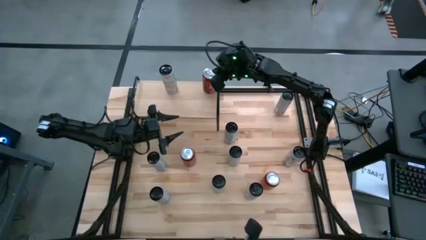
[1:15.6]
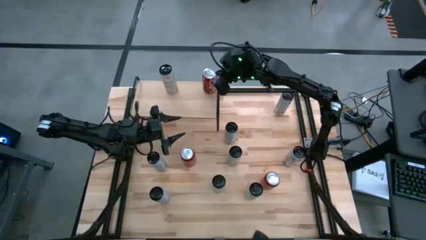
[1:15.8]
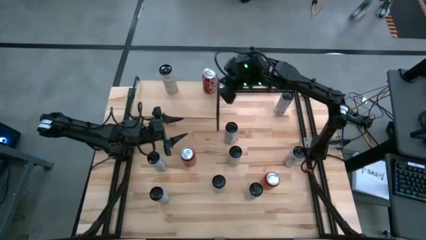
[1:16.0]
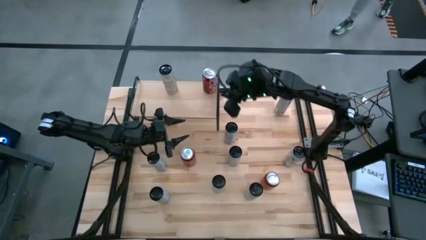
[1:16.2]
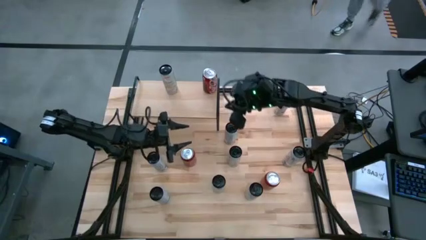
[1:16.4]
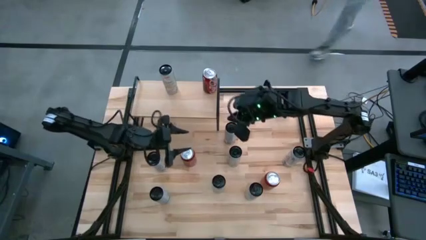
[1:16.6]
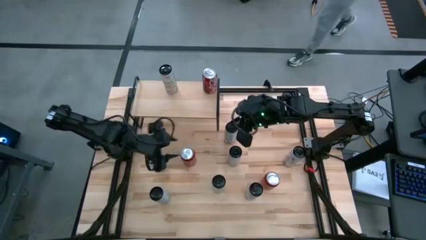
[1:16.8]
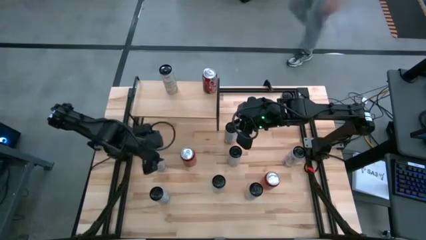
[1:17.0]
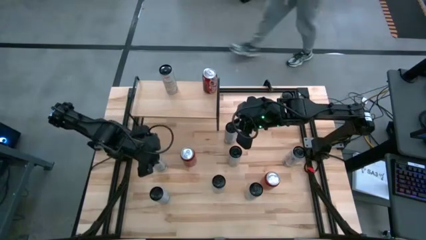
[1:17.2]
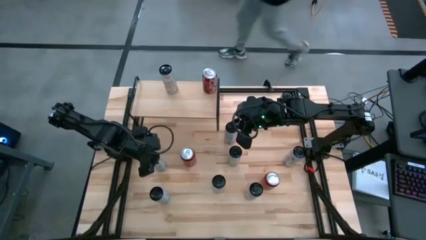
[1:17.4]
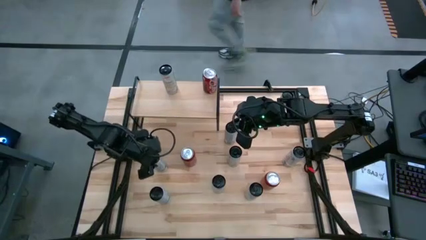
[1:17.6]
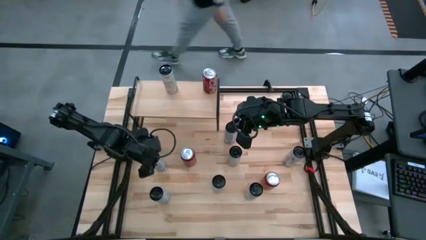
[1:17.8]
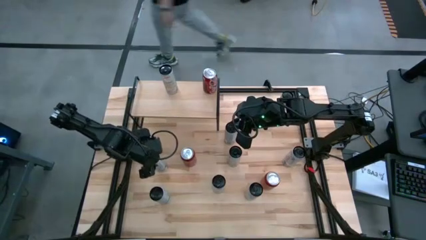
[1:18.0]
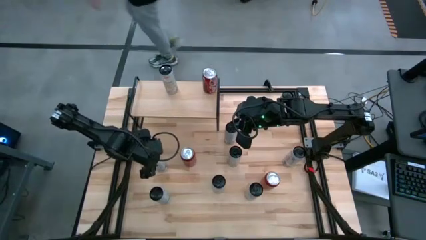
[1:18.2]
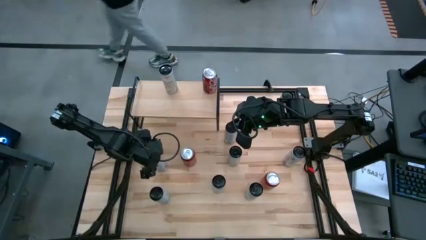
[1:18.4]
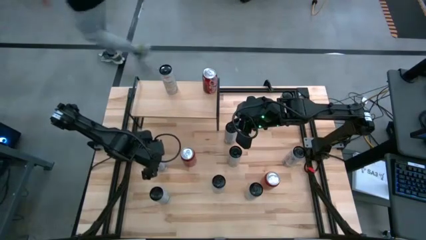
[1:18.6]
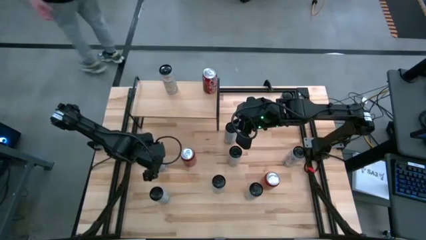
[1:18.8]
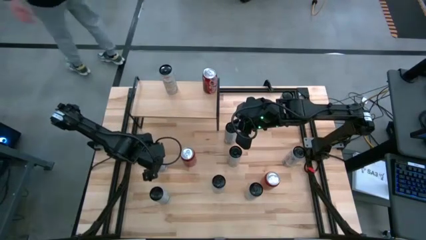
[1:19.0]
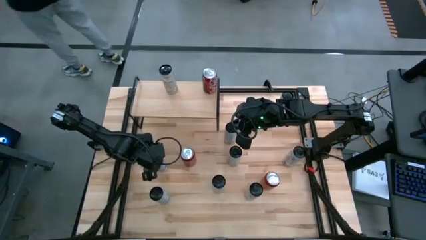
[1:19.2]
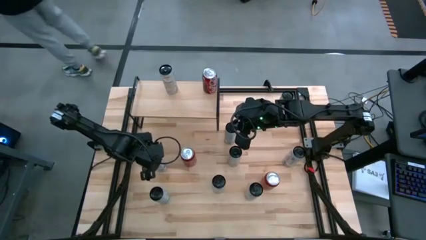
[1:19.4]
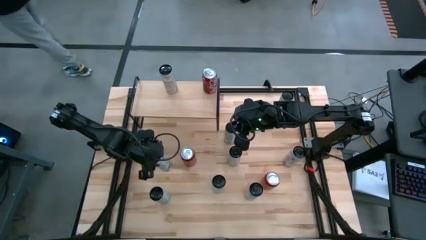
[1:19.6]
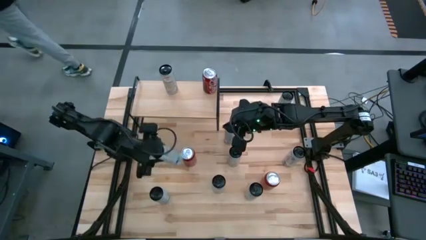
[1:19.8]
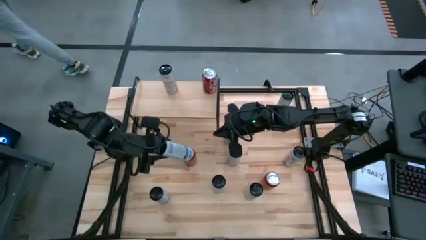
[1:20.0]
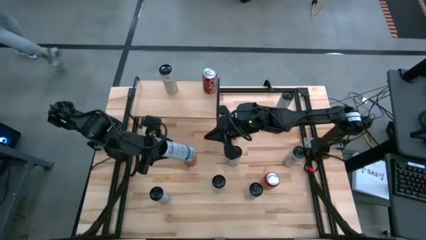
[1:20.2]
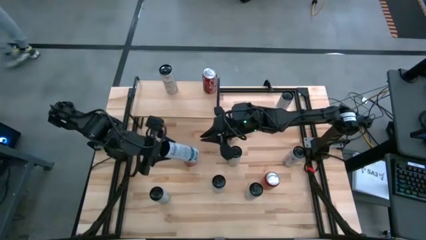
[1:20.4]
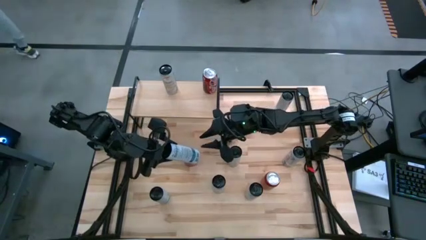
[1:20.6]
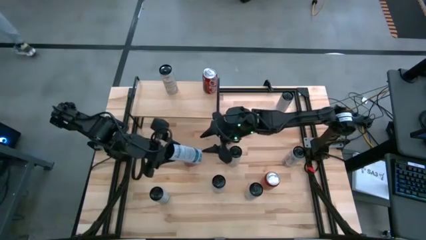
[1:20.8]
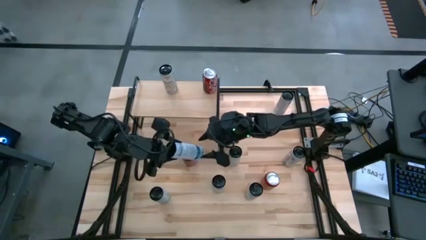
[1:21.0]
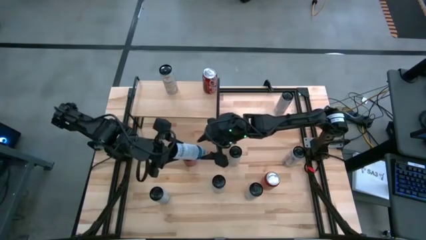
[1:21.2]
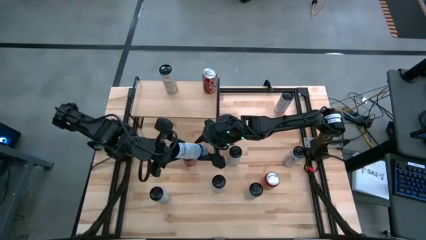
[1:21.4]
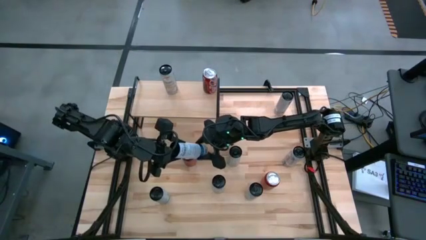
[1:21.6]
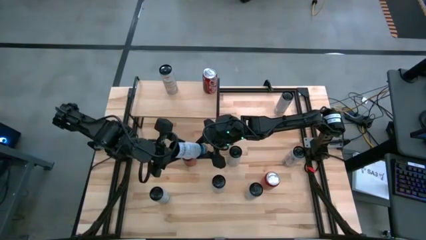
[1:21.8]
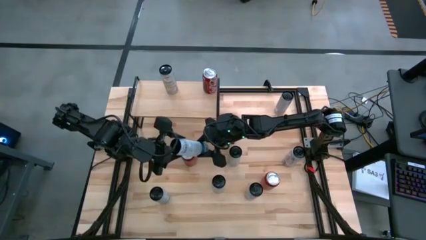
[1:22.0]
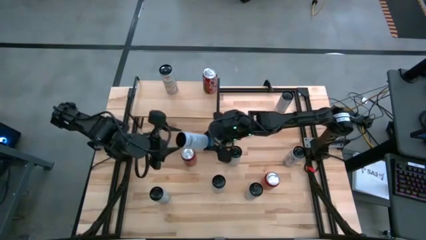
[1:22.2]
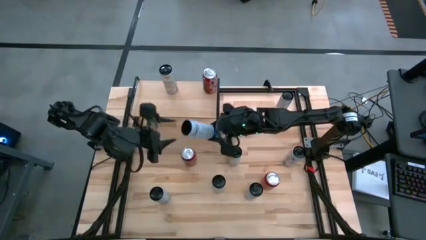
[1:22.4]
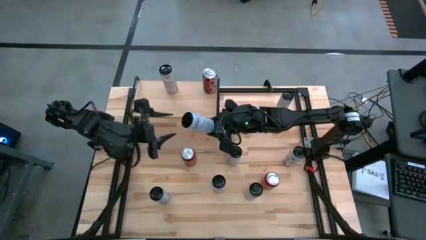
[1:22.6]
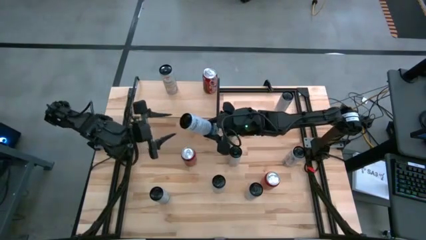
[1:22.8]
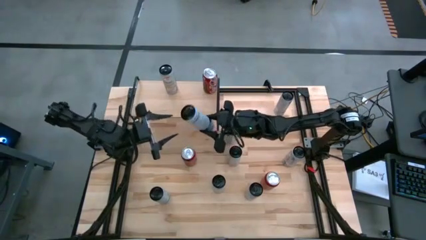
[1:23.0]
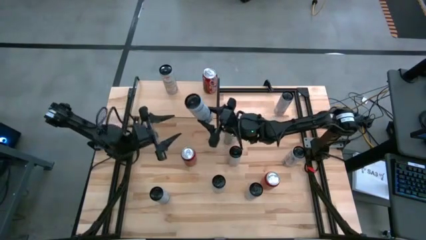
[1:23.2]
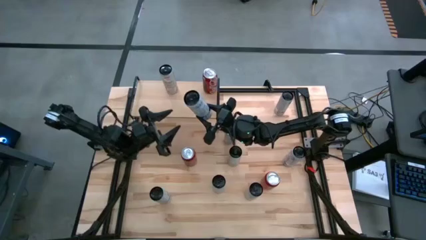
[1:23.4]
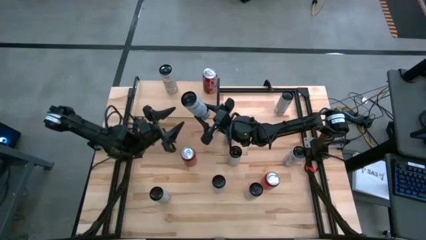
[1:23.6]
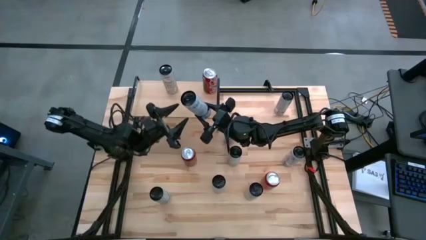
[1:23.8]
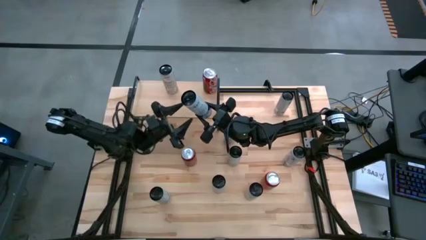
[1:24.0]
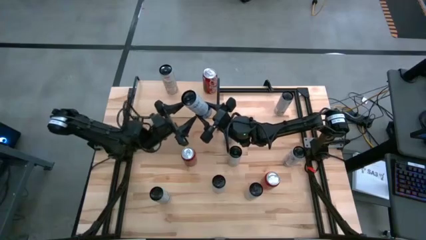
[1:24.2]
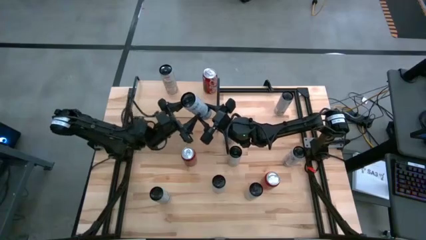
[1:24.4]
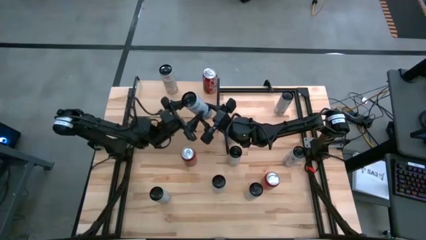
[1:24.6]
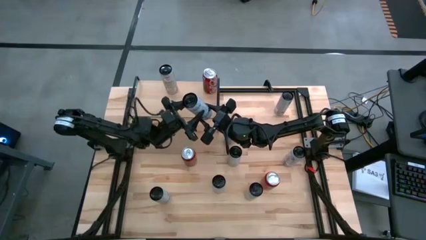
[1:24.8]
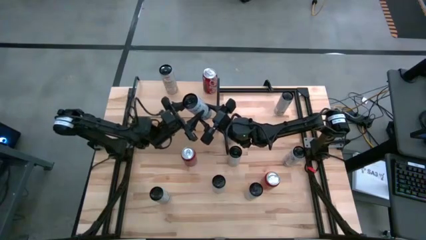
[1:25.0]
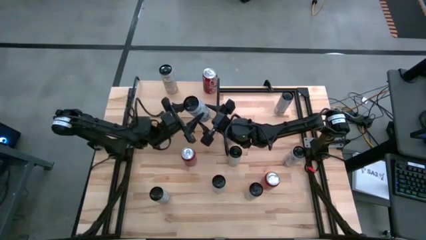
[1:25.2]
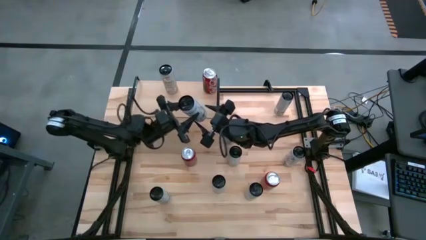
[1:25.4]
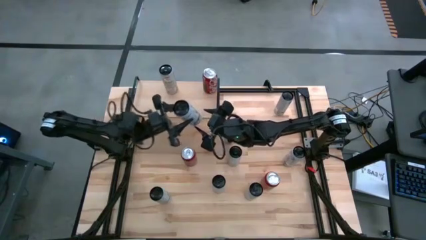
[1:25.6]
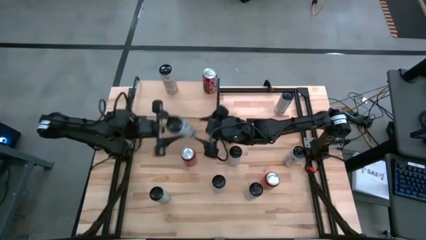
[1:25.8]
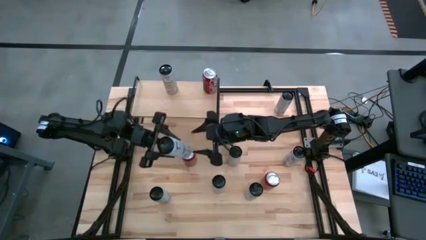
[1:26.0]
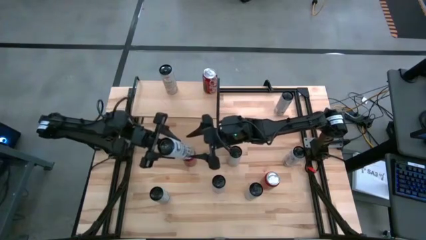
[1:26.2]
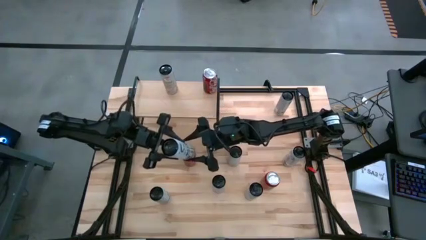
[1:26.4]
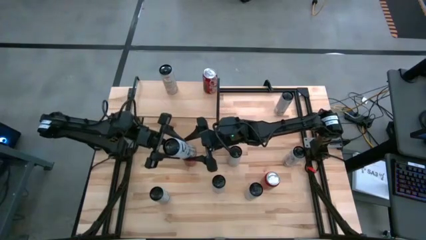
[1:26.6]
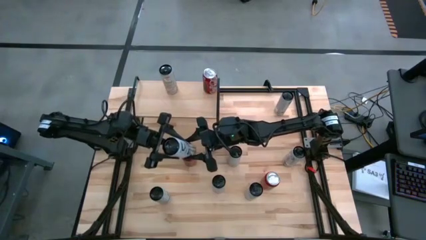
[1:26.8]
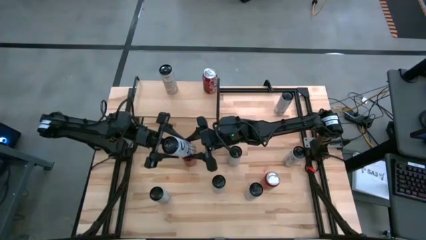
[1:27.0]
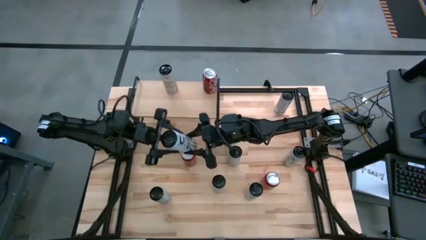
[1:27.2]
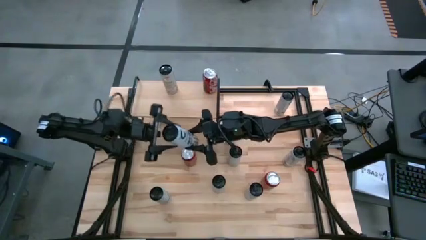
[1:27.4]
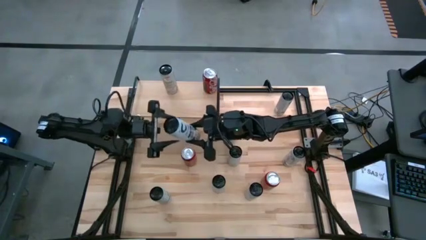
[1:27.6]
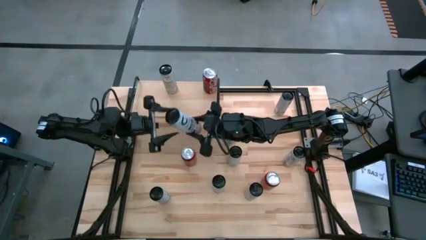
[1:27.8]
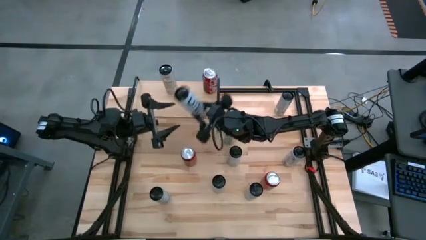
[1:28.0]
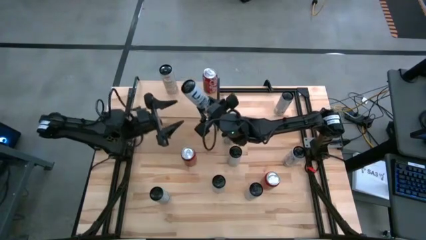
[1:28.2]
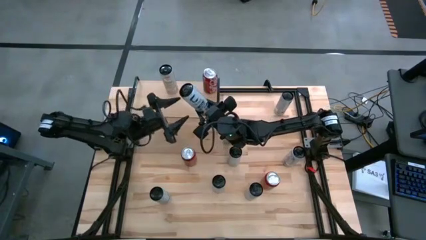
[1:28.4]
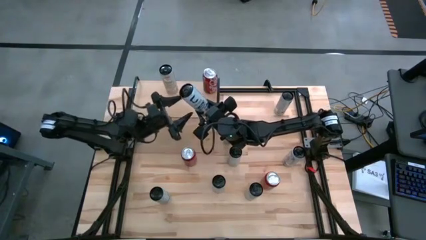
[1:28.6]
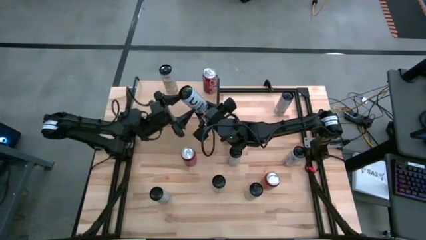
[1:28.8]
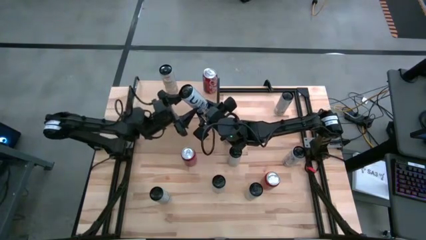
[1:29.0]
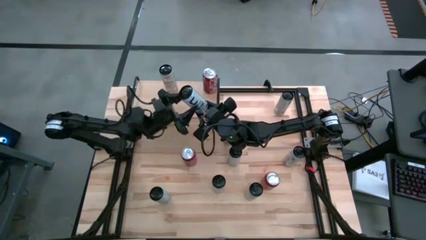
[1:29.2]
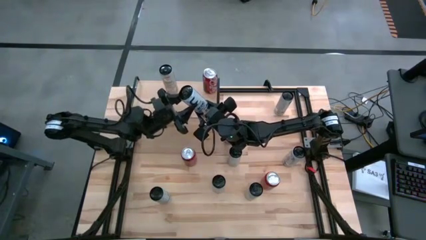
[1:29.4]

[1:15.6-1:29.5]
Task: Place canned beverage on shelf
Put the top left white blue soda can on the shelf

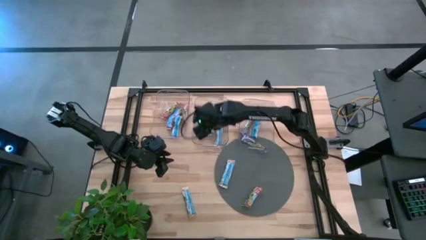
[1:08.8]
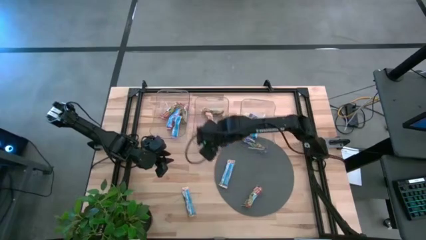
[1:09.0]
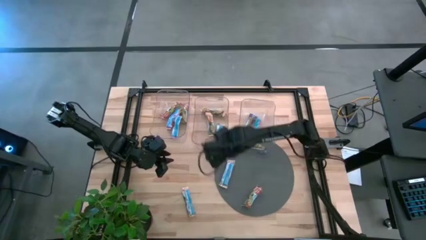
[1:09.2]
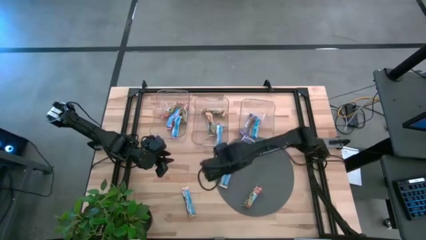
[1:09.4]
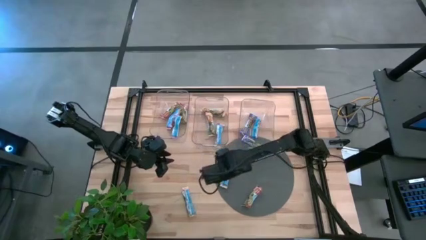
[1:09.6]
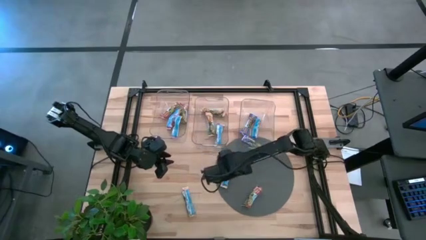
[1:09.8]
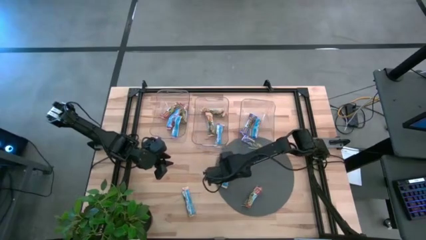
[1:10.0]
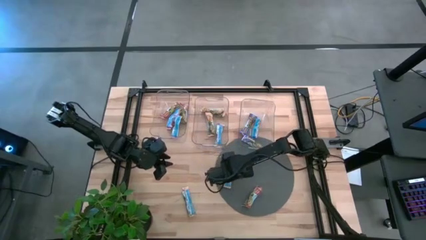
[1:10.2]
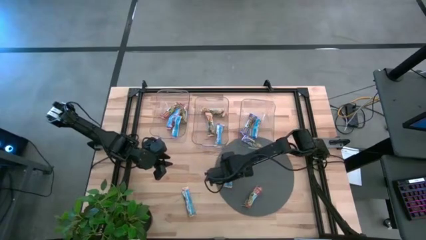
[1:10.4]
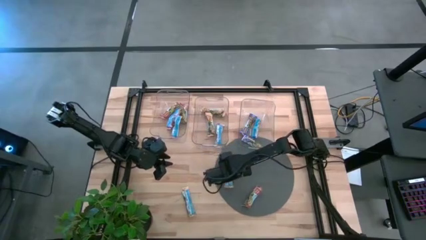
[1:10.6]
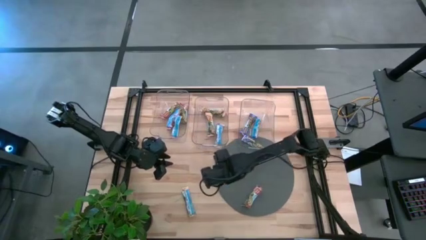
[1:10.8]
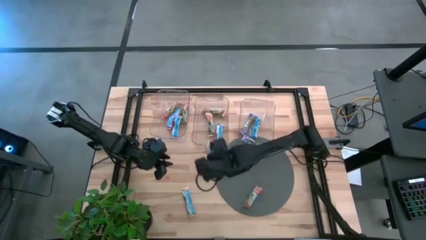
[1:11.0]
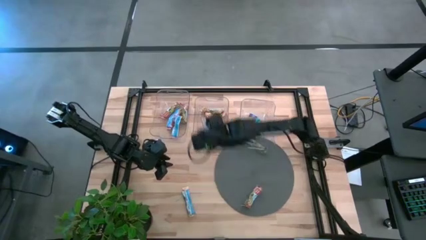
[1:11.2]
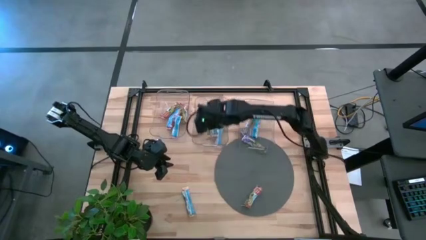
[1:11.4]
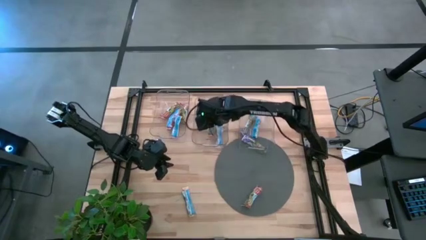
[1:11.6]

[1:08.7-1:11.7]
Task: Pick and place Granola Bars by type
Put the orange snack bar into the middle transparent bin
